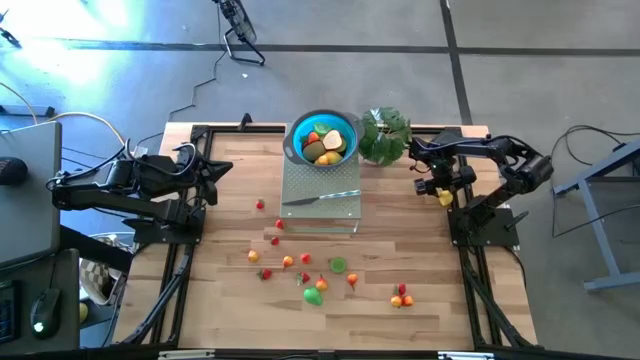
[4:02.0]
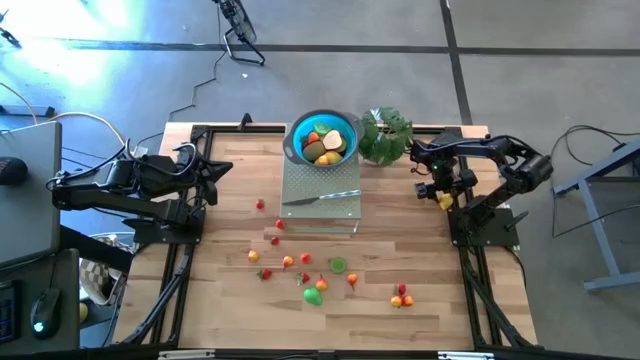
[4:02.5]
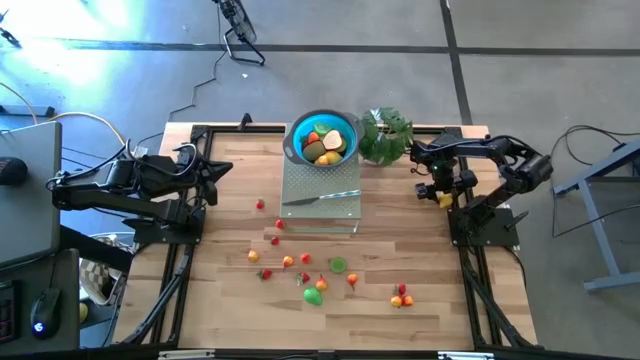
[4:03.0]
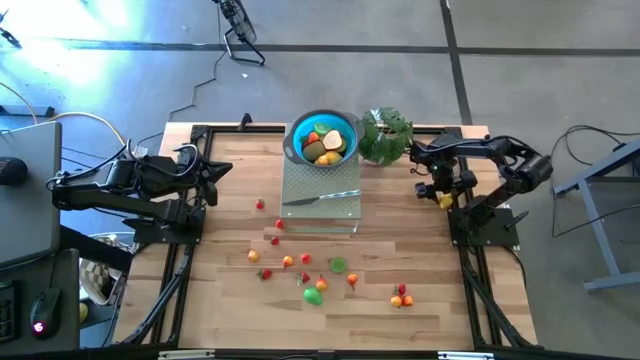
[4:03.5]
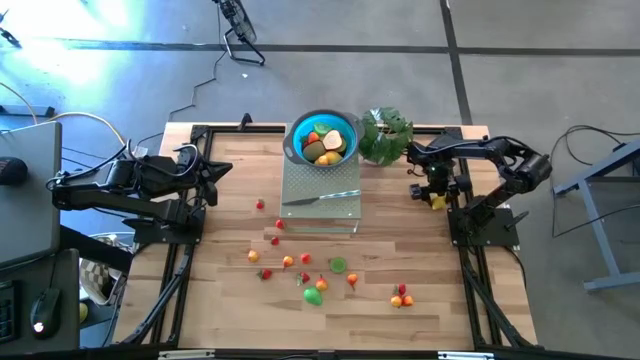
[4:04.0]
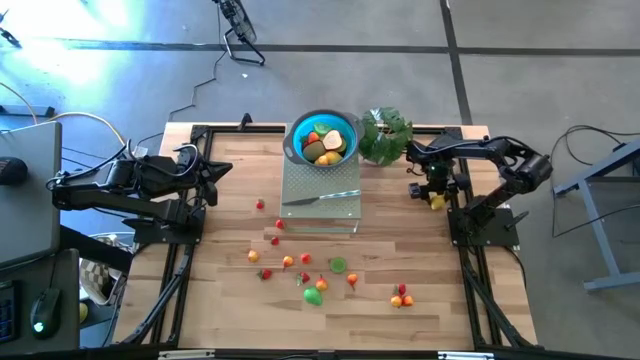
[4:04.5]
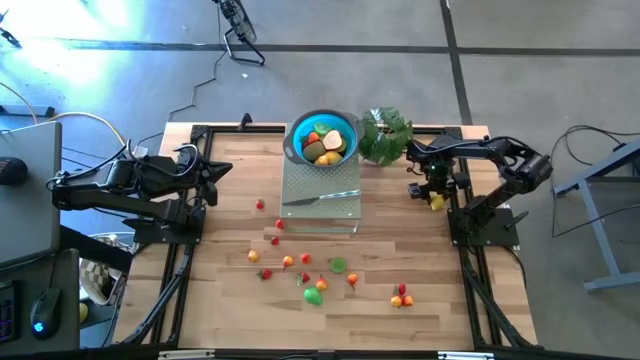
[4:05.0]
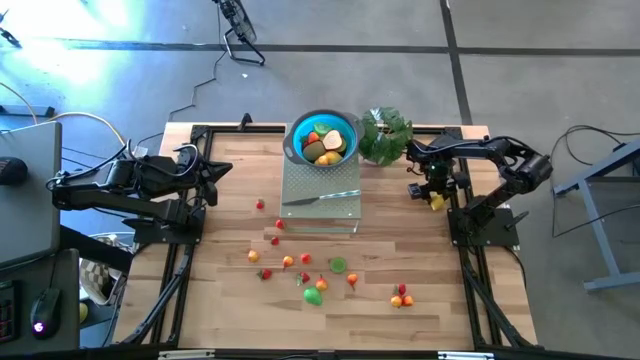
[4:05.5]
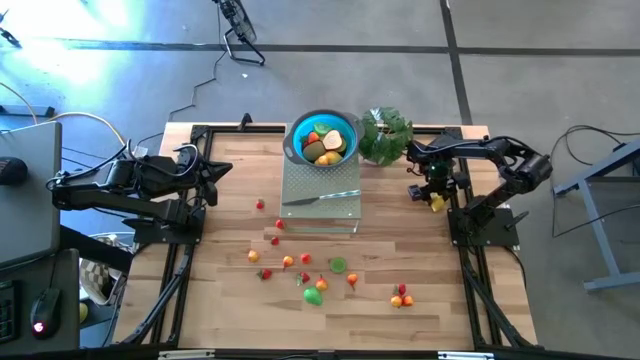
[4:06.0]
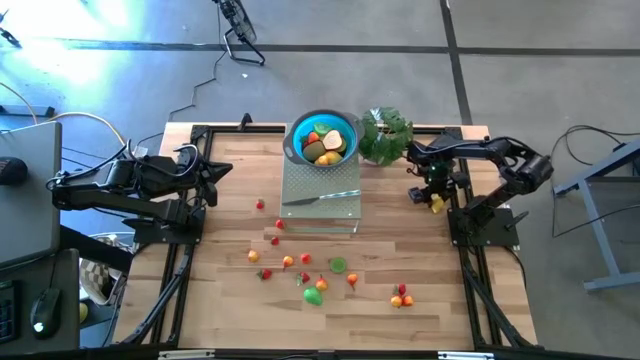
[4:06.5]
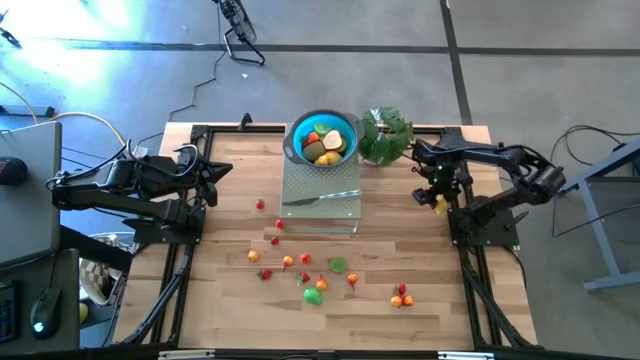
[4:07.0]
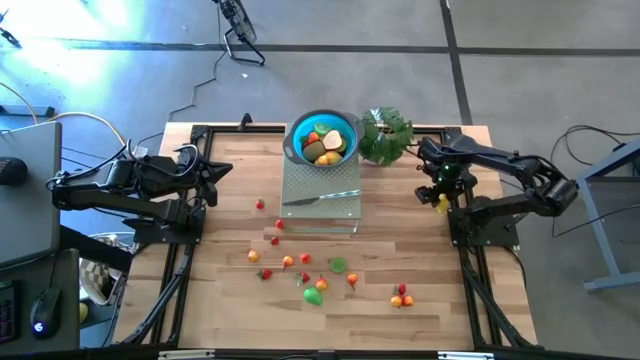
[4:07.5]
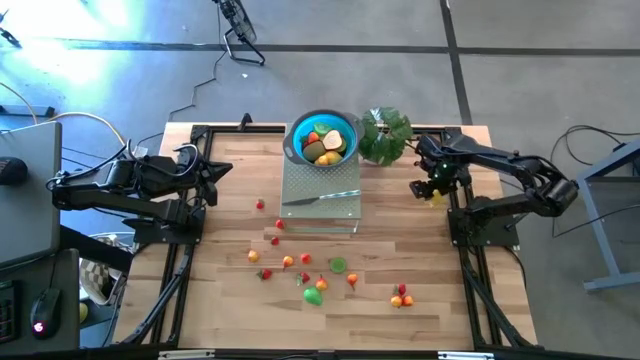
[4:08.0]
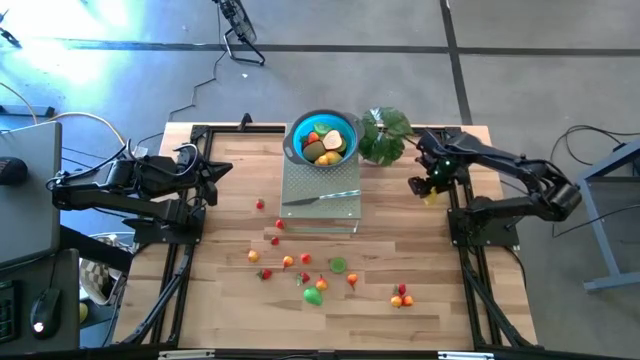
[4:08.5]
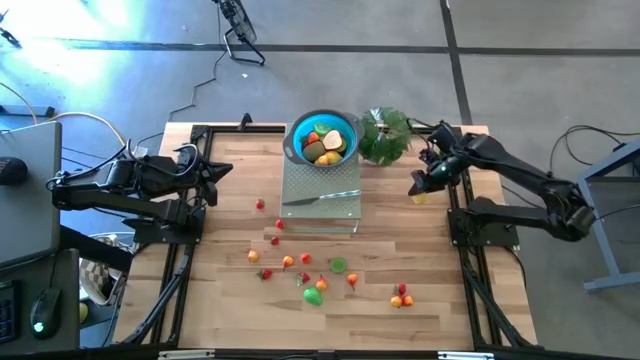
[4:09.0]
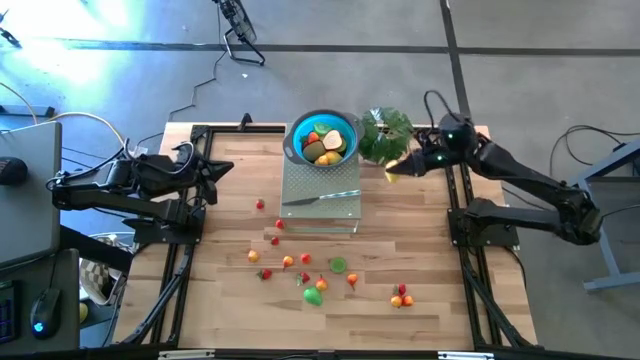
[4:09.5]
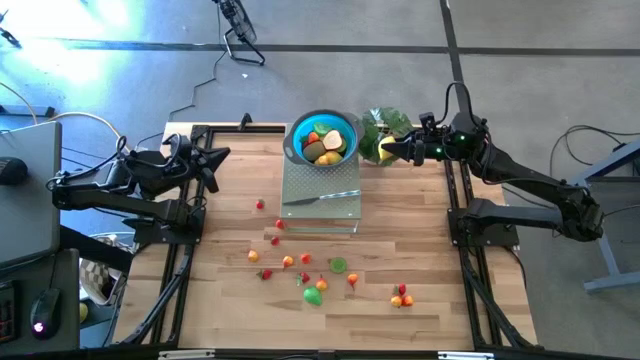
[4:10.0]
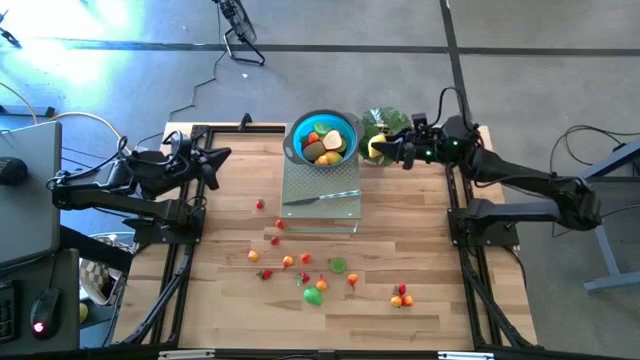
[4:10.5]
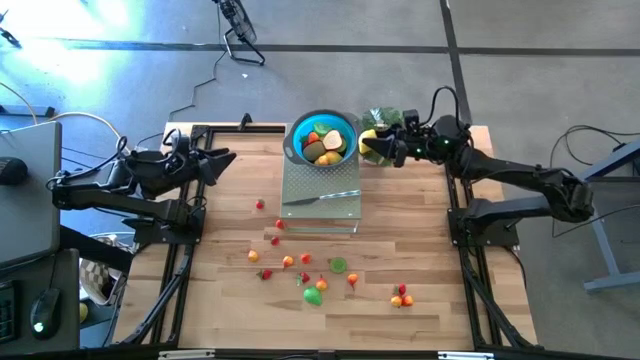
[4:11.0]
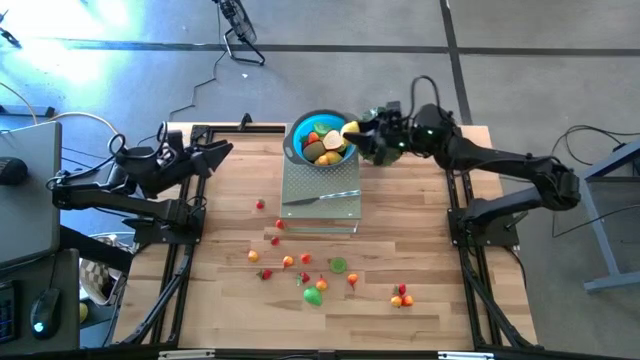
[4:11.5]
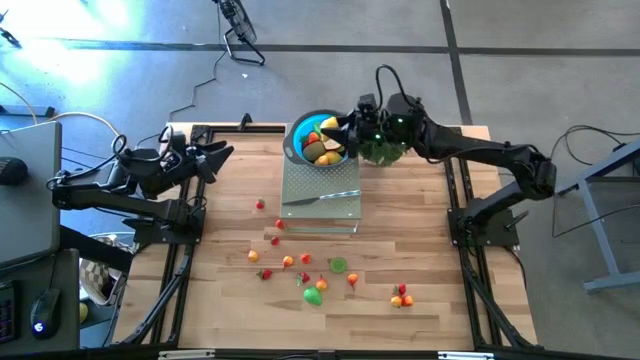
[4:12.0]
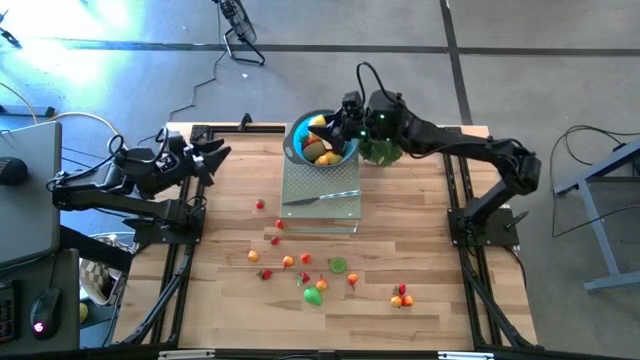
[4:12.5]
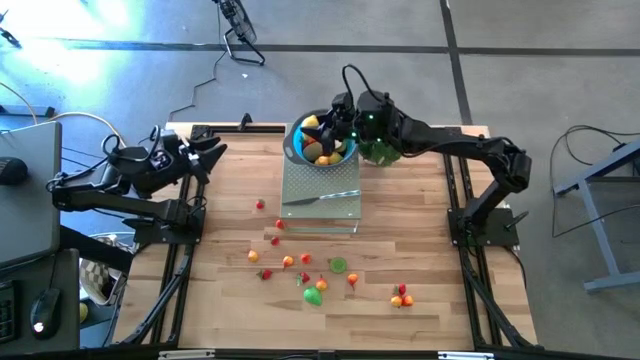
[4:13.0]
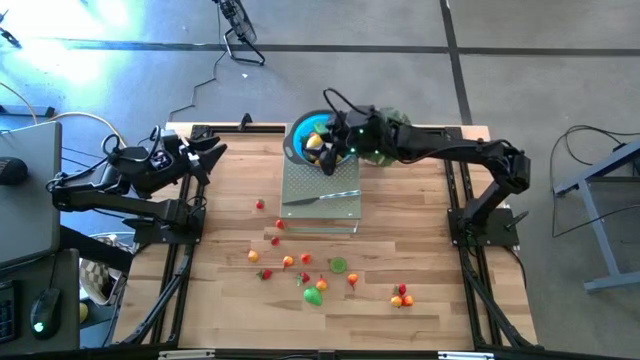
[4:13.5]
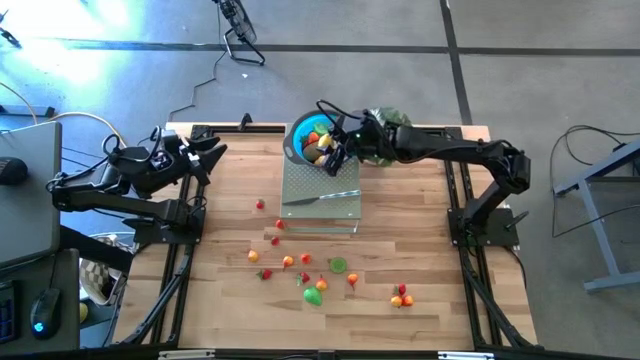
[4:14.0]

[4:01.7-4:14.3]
Task: Pick & Place Fruit
Put the yellow lemon in the blue bowl on the shelf

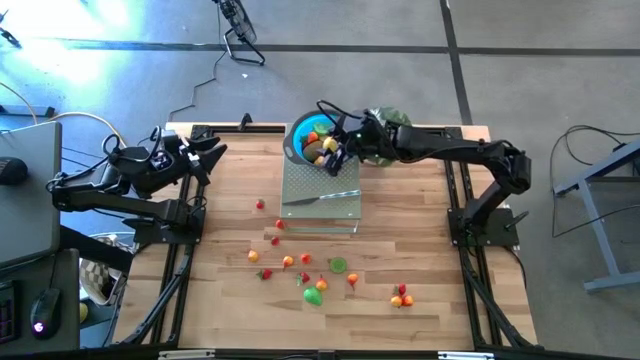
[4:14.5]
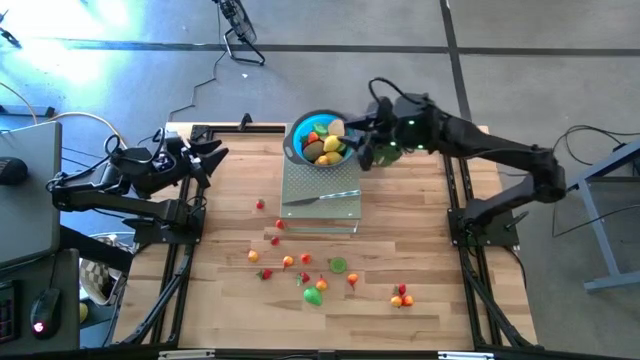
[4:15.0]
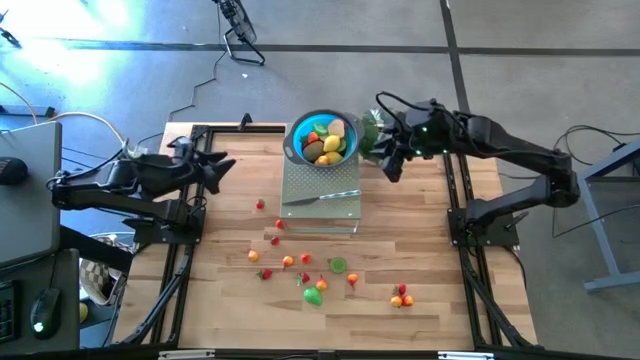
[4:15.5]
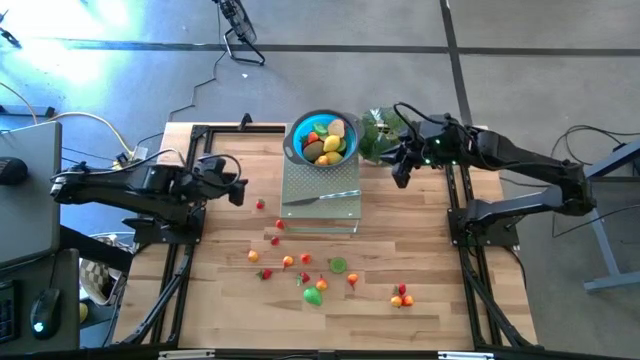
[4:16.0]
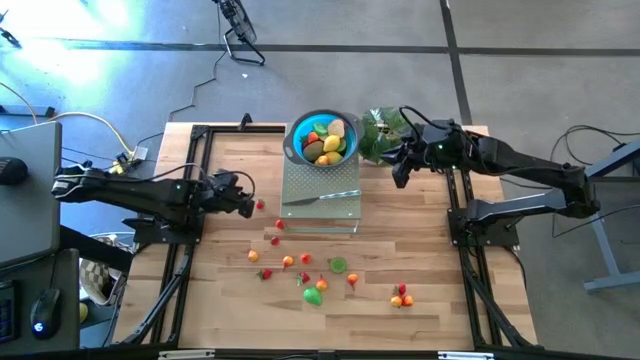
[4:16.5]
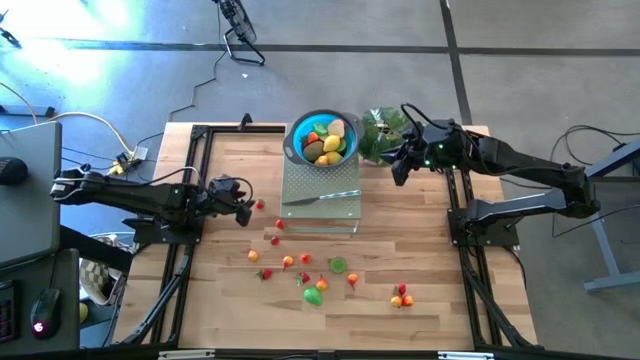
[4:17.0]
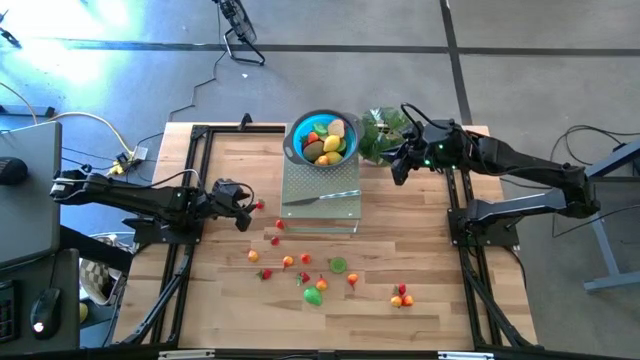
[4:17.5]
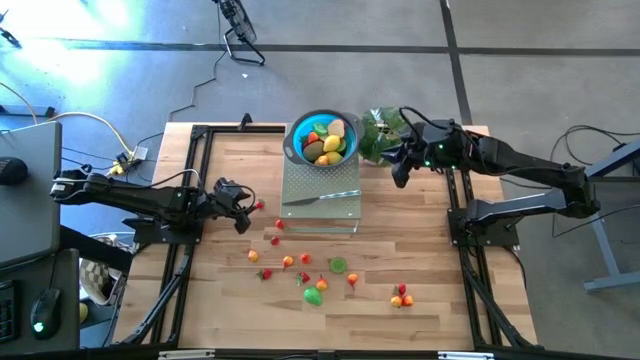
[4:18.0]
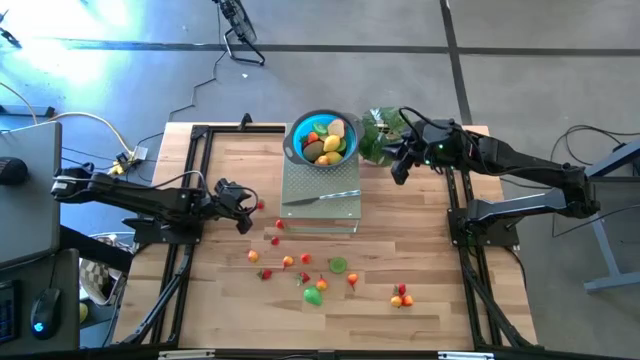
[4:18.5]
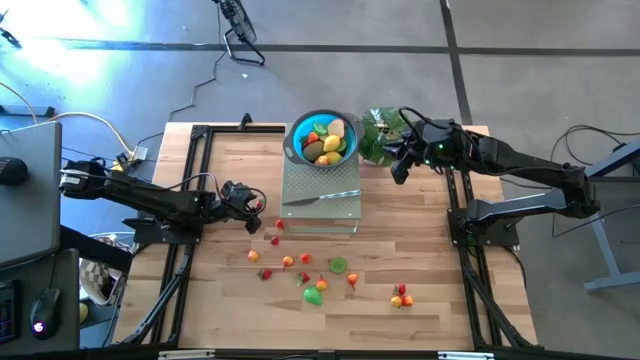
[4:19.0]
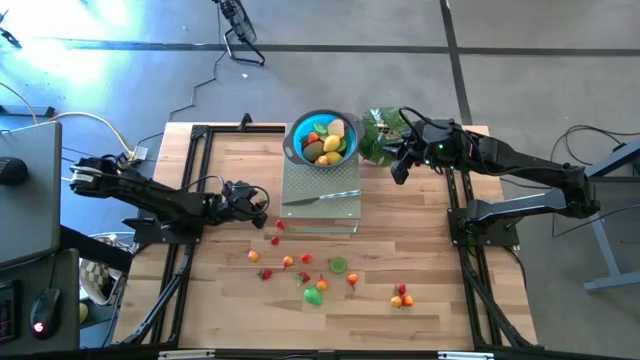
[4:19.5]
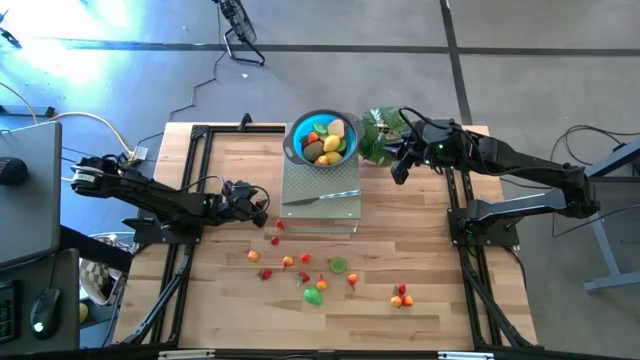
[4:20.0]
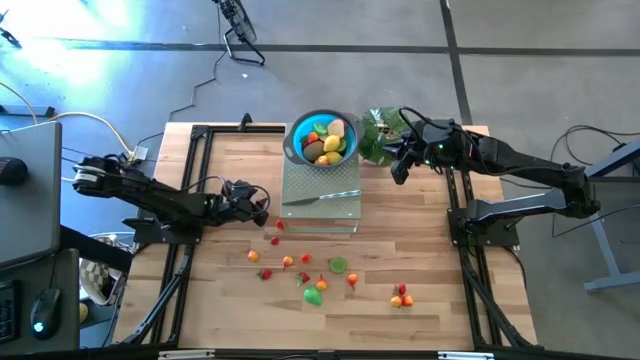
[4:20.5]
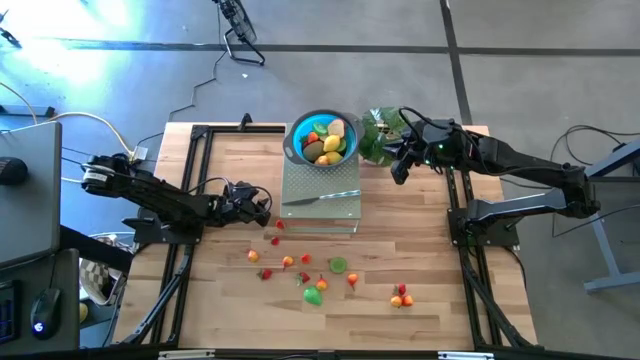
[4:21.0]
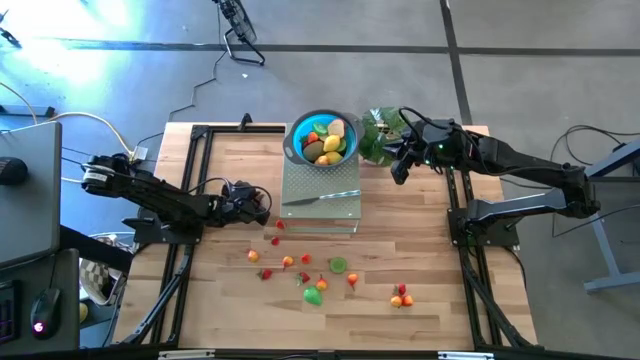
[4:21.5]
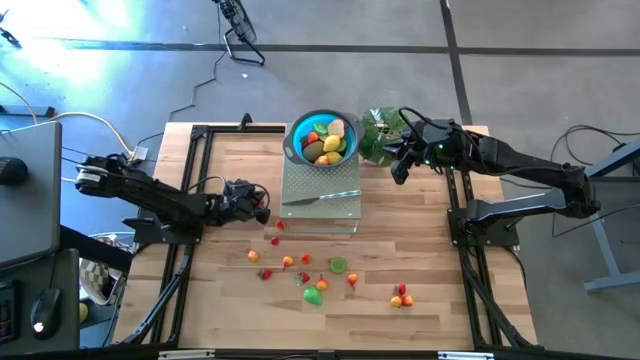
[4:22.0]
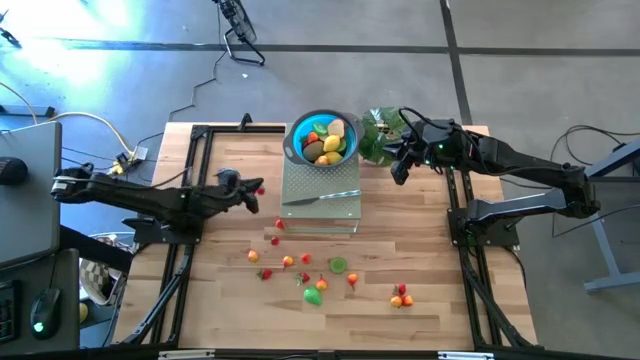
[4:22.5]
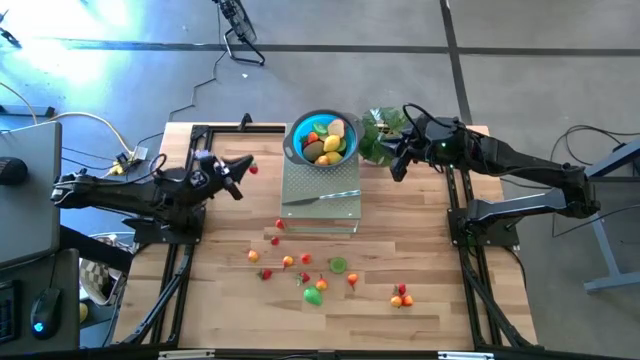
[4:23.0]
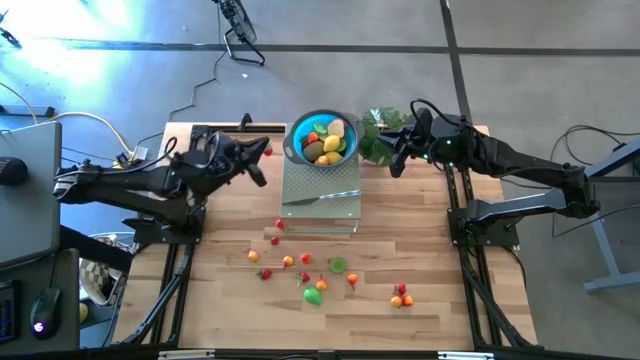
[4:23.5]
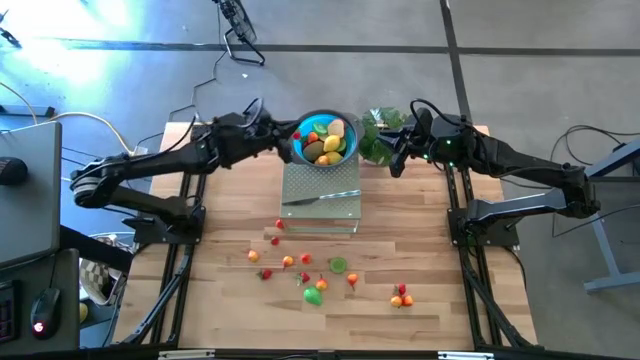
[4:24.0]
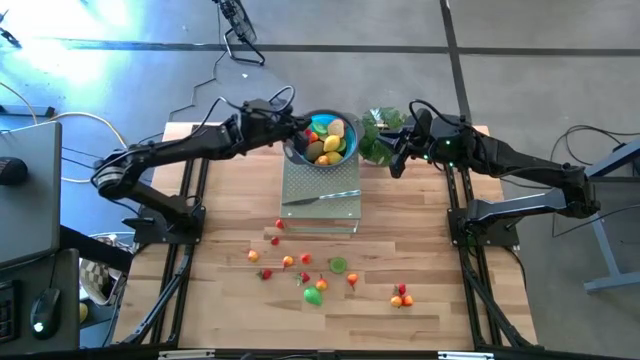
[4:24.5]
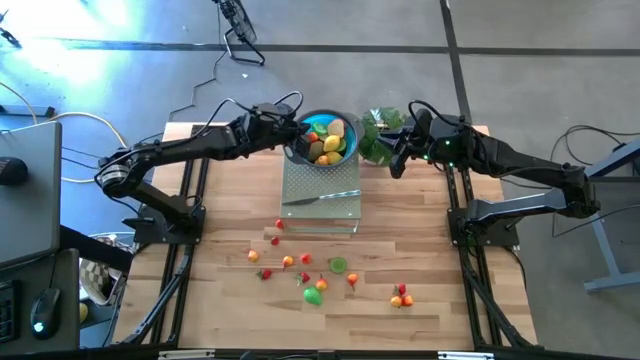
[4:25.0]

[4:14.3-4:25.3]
Put the red strawberry in the blue bowl on the shelf
